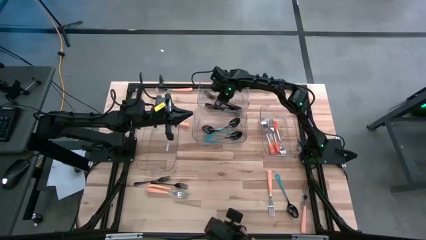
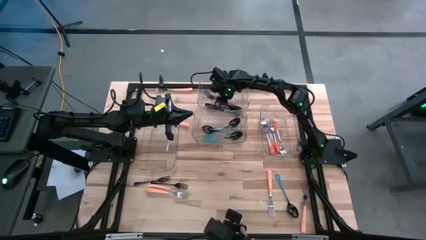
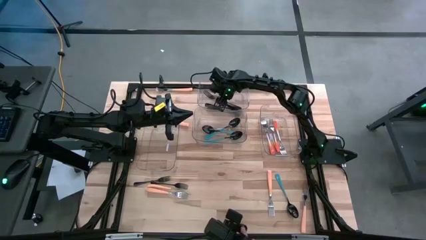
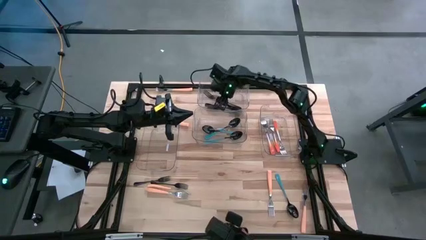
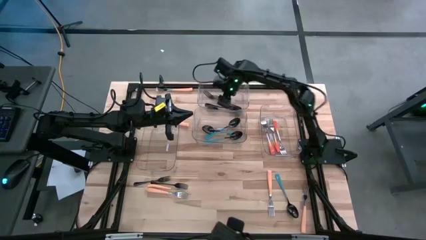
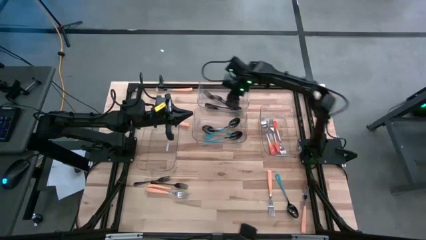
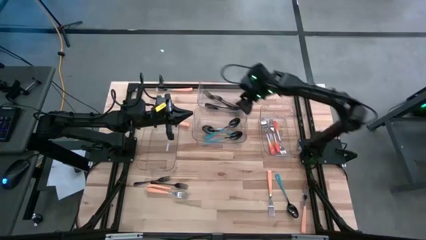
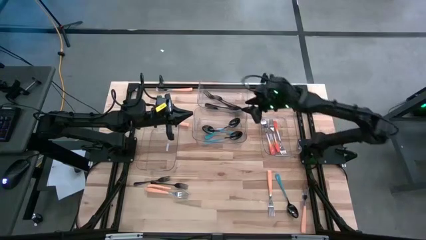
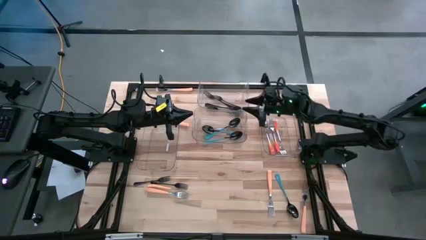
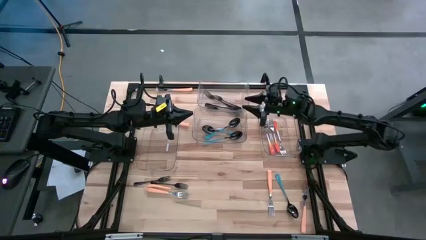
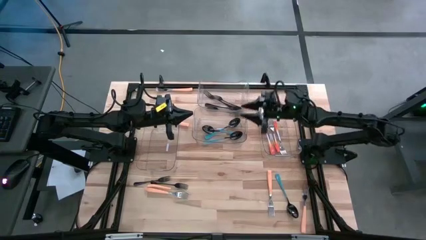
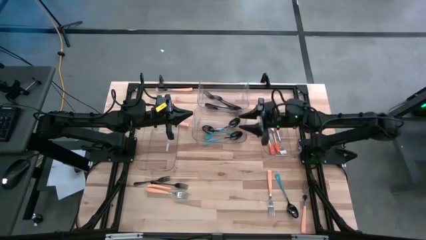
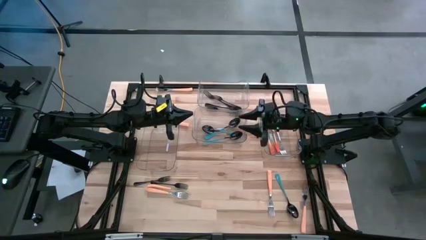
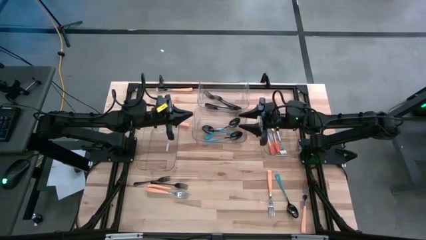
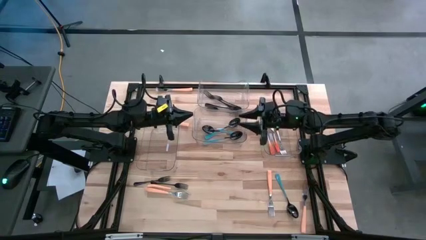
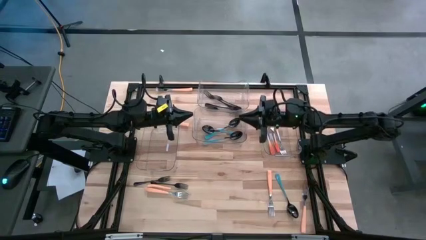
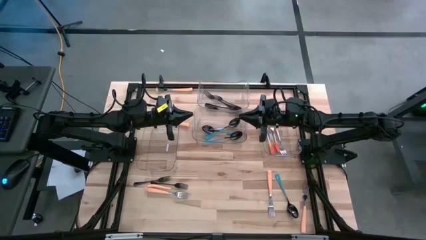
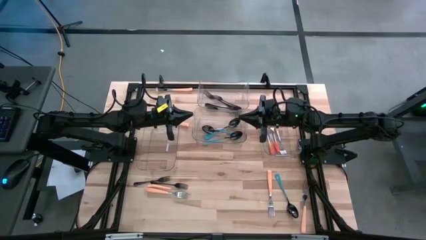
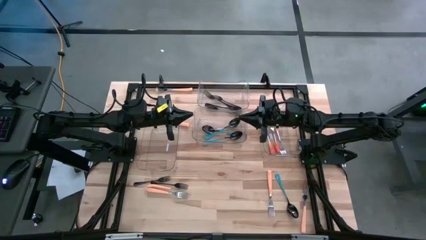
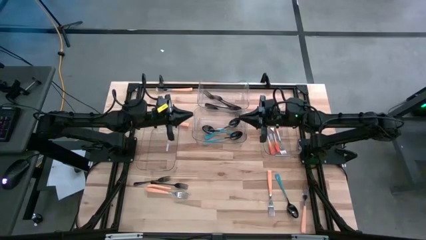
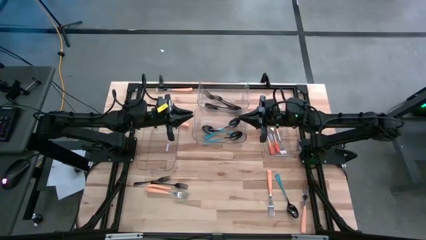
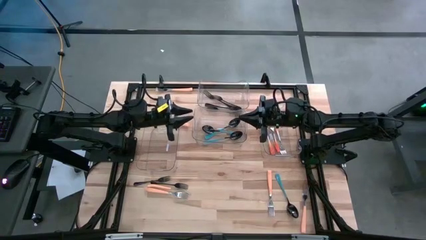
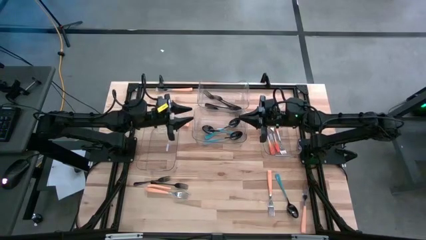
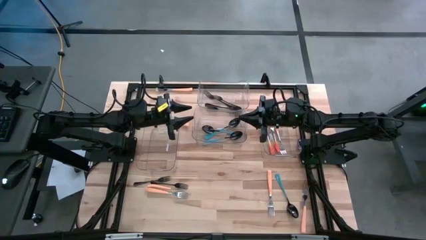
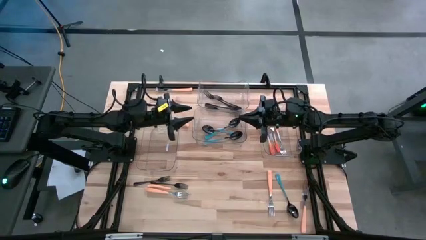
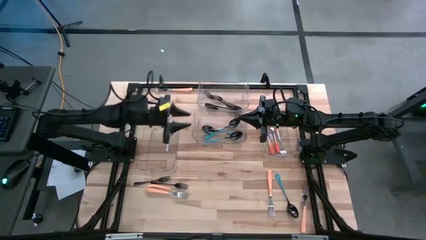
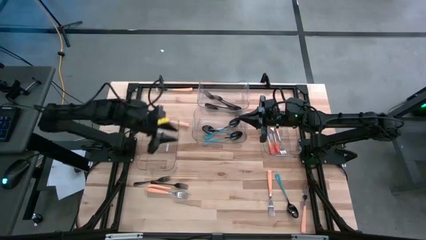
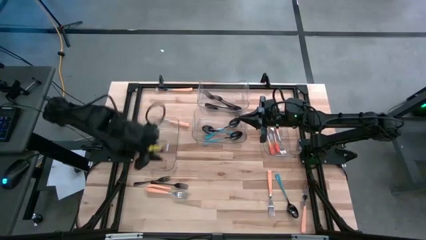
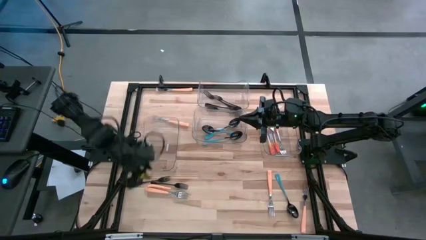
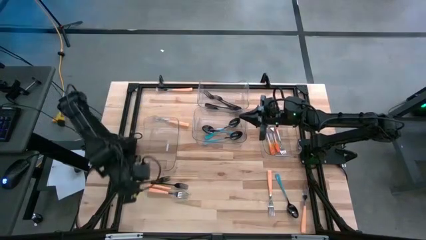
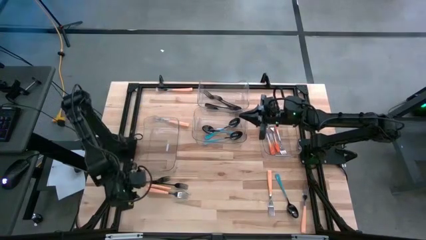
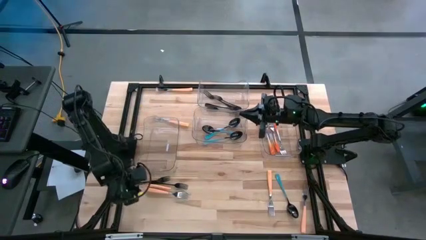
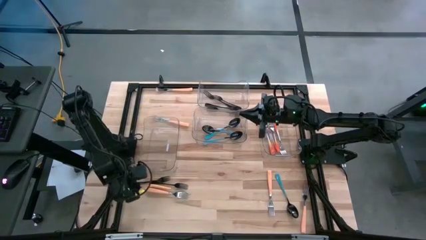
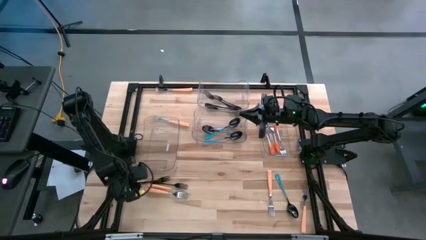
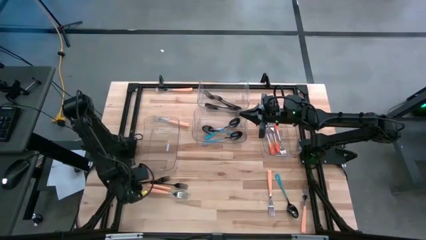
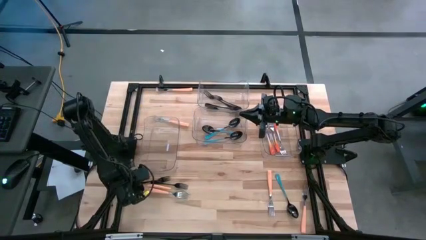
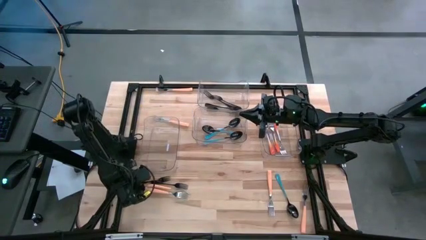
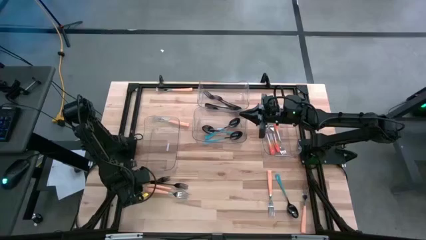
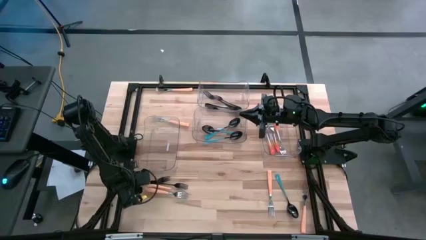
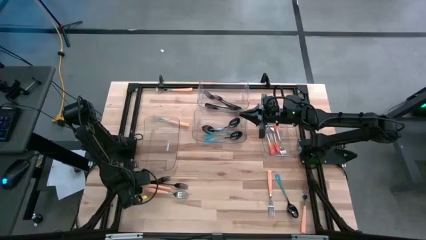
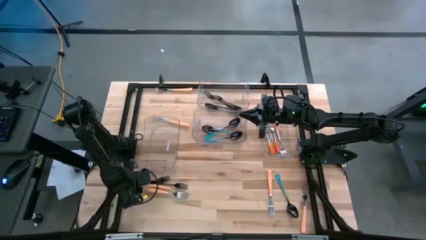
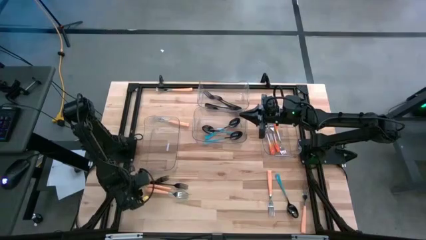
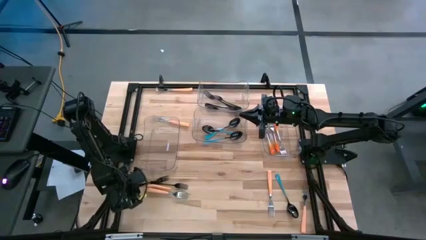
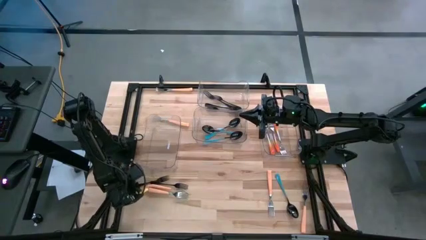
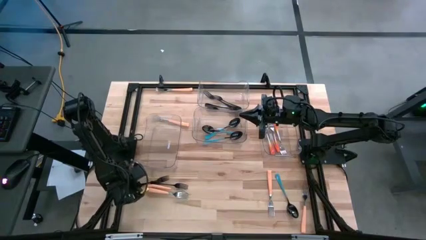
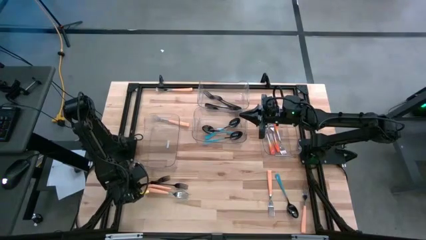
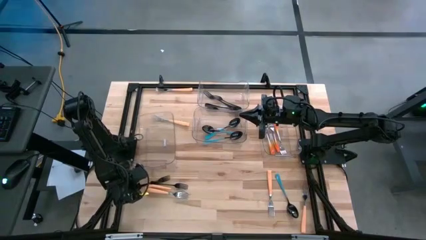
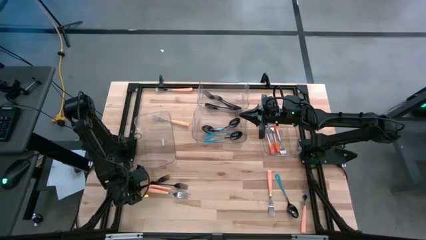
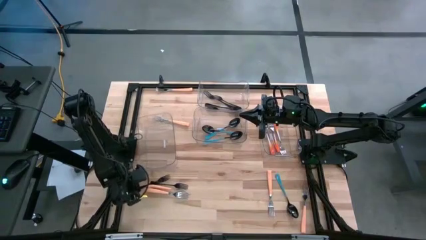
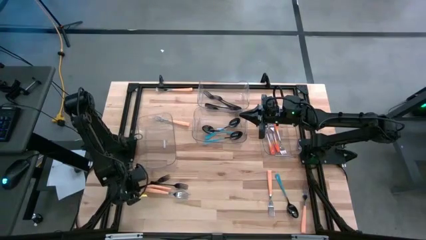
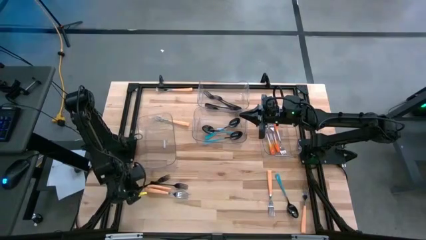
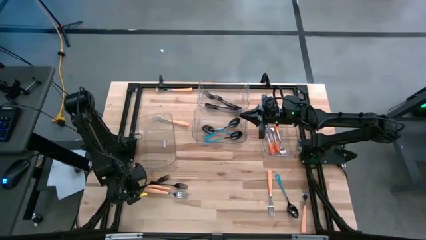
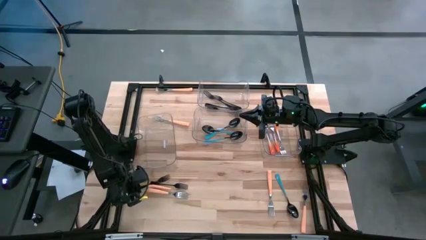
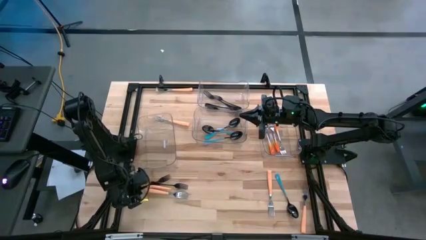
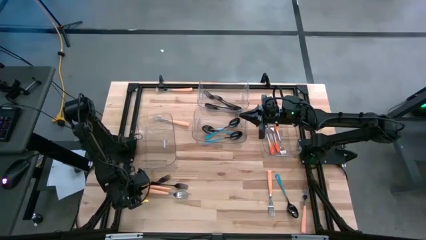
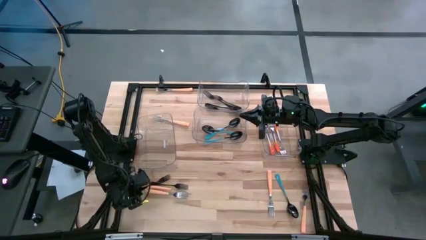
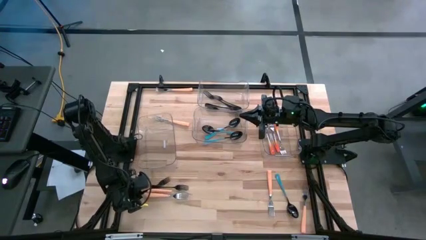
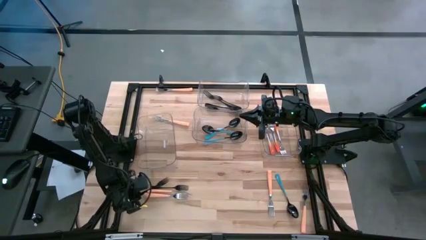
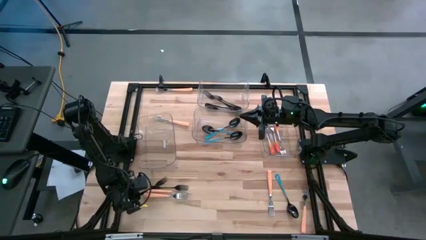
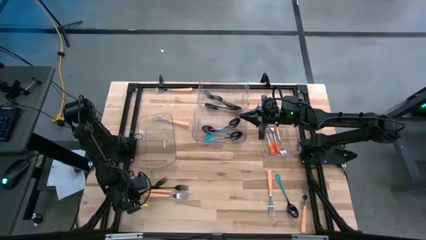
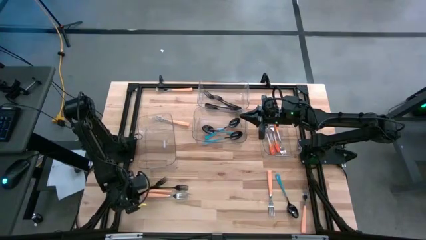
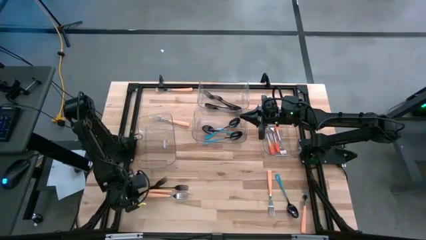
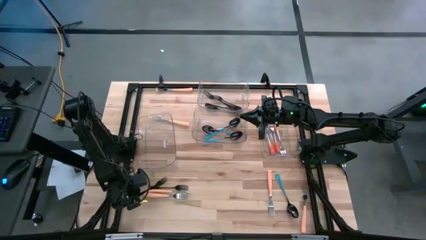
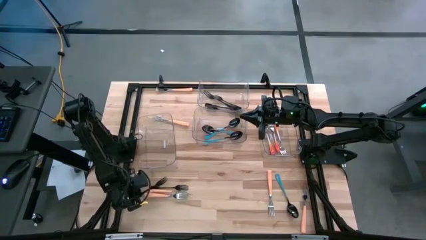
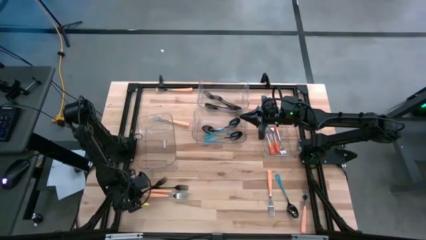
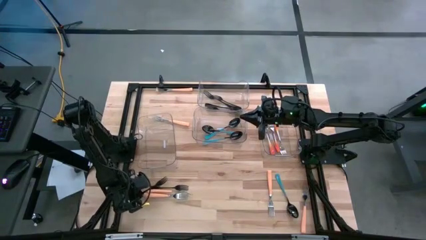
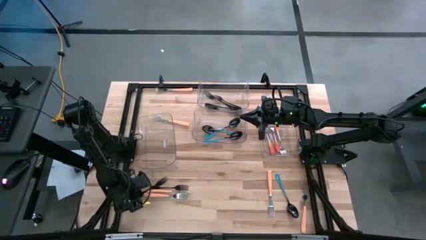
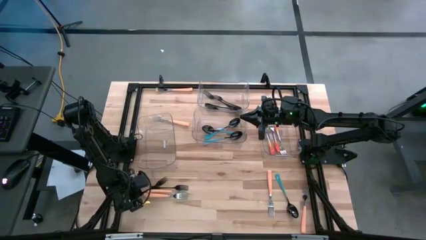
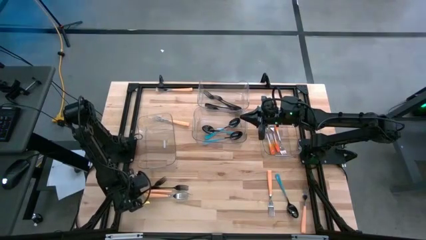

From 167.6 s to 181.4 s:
Task: Sort silverware by color (type)
Put the black fork into the top transparent bin
